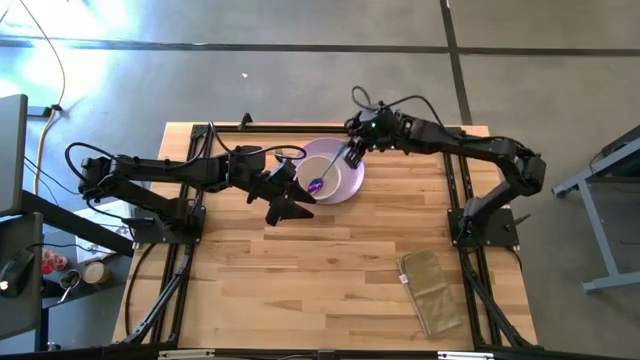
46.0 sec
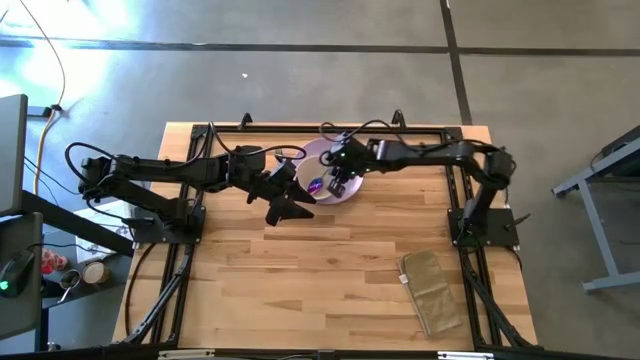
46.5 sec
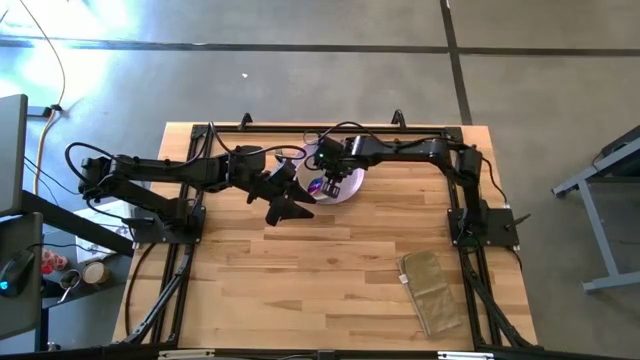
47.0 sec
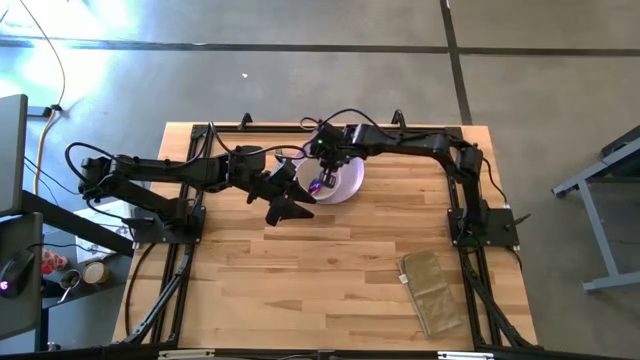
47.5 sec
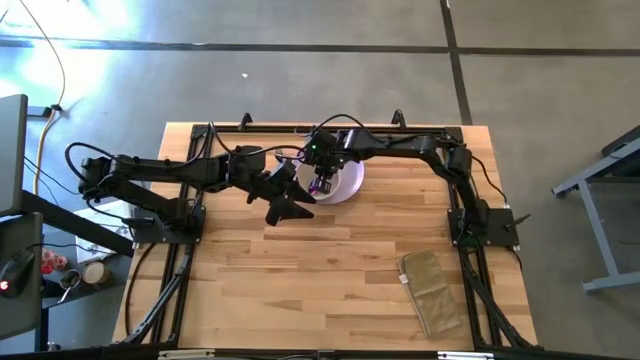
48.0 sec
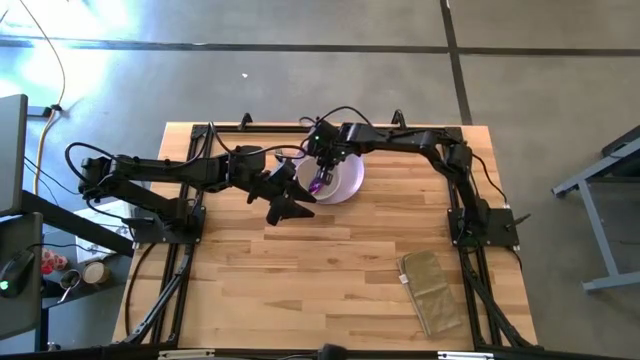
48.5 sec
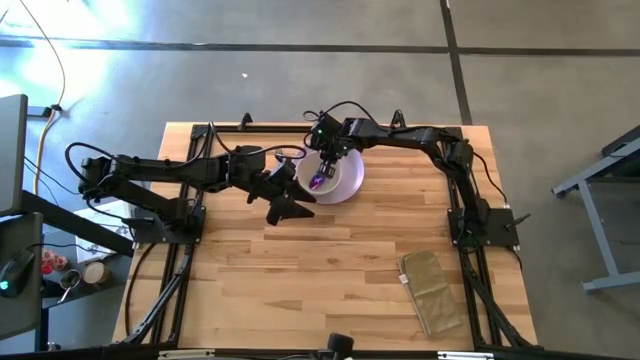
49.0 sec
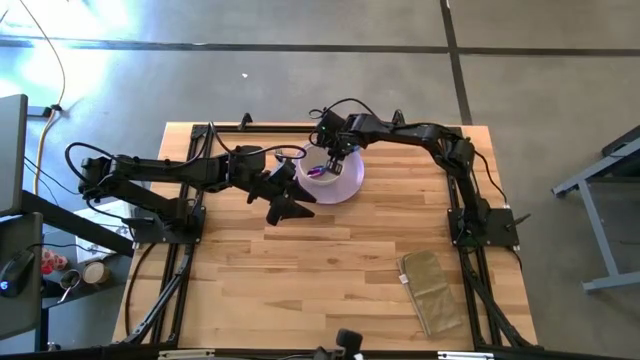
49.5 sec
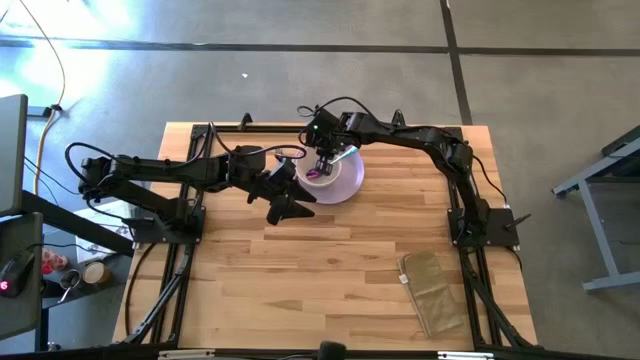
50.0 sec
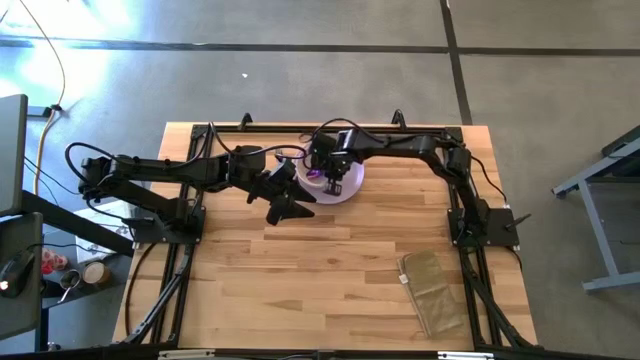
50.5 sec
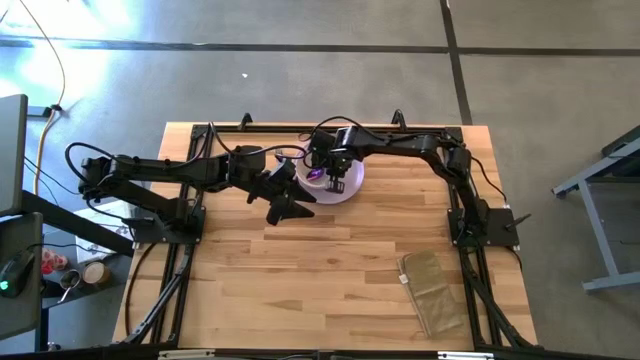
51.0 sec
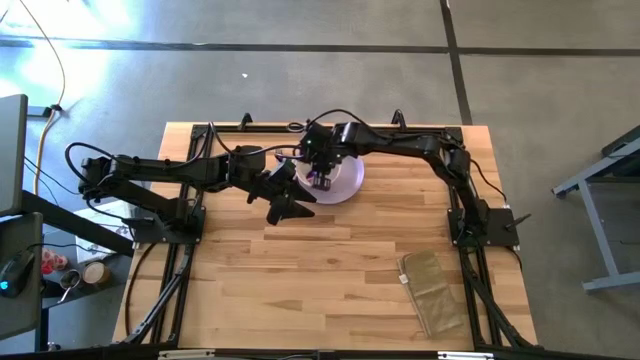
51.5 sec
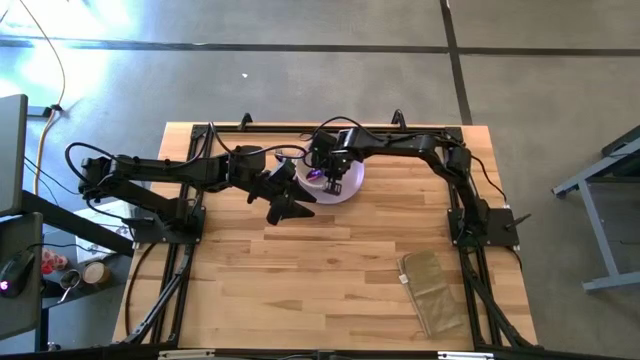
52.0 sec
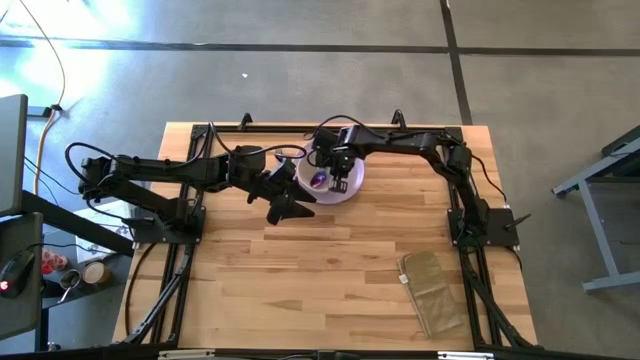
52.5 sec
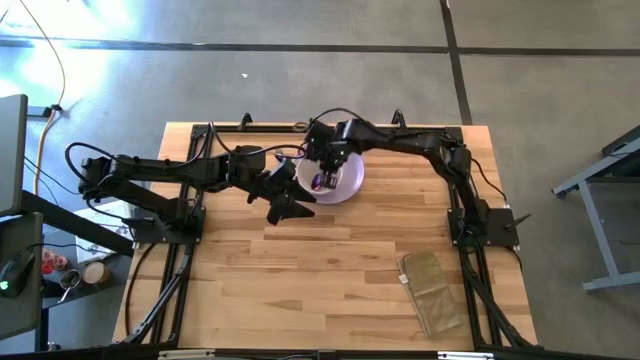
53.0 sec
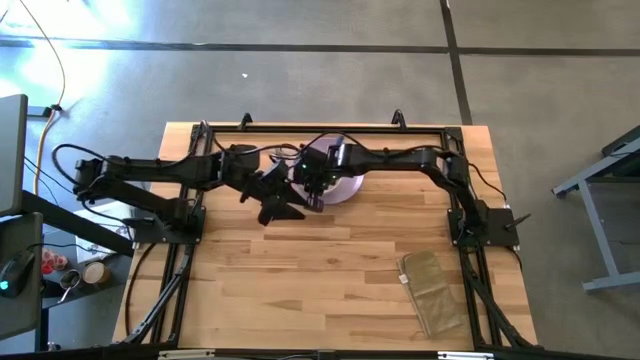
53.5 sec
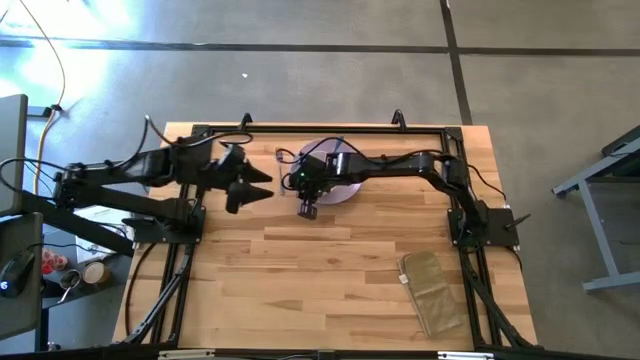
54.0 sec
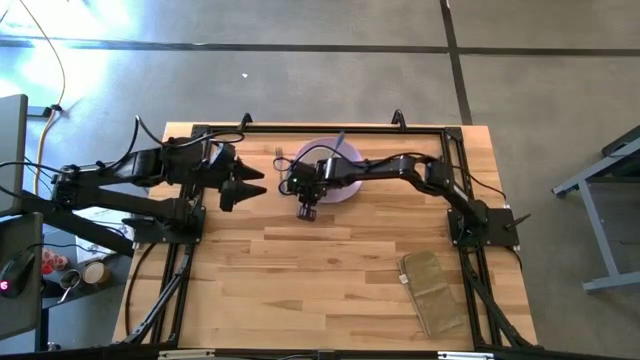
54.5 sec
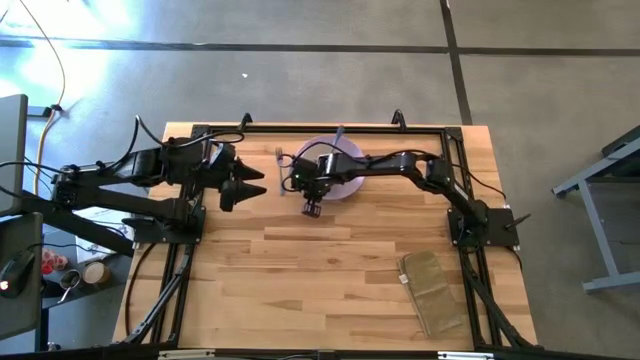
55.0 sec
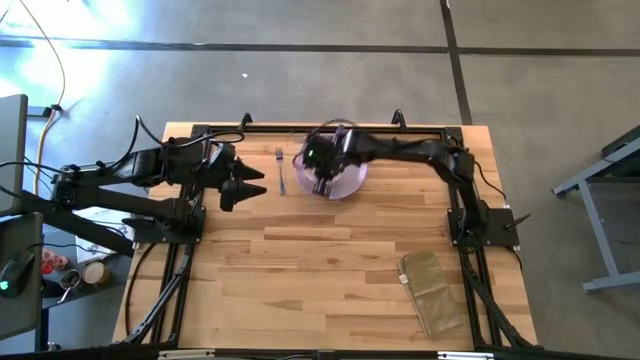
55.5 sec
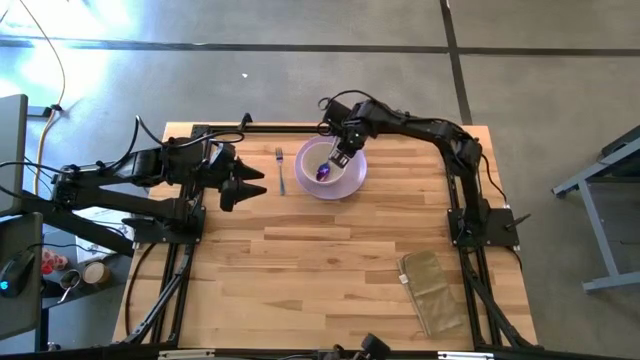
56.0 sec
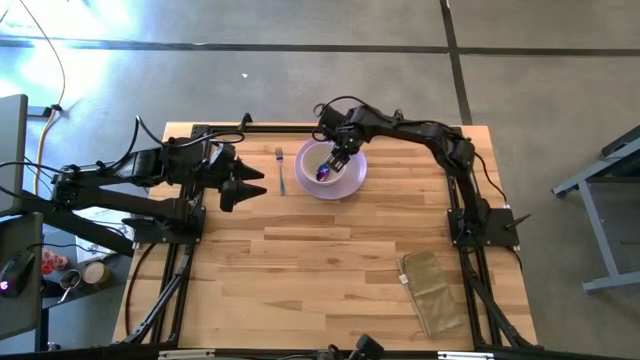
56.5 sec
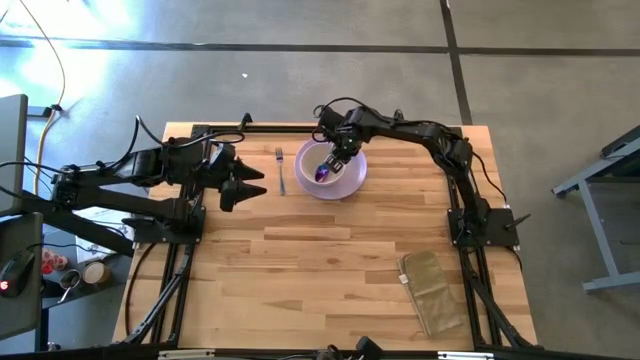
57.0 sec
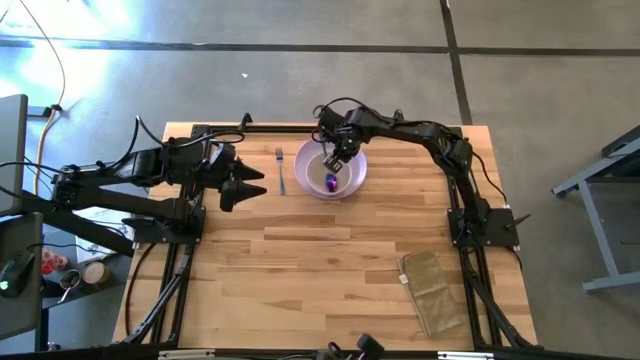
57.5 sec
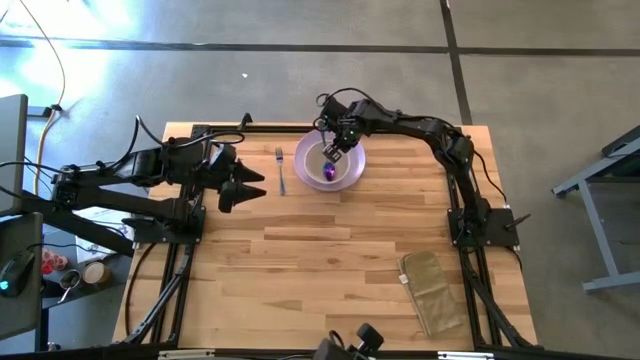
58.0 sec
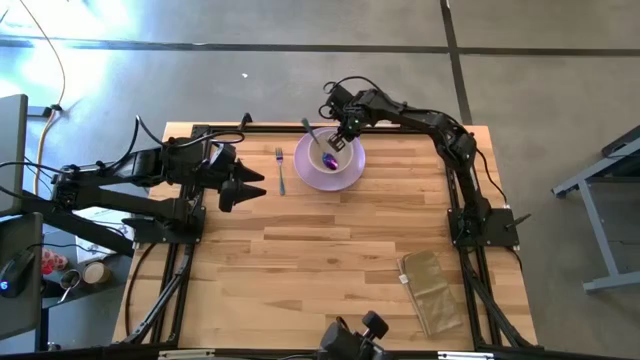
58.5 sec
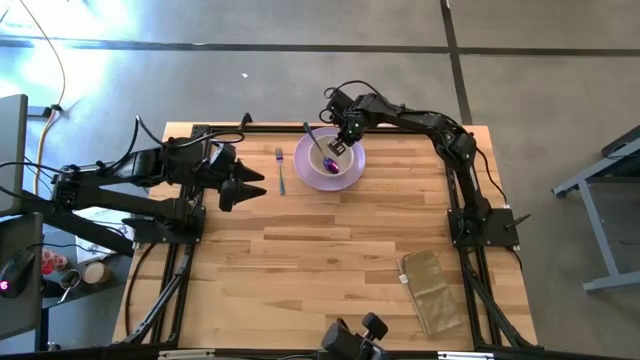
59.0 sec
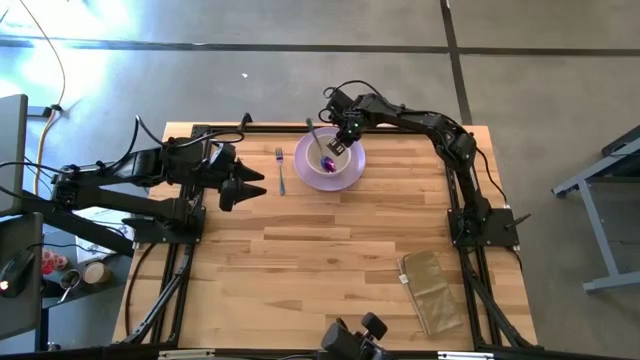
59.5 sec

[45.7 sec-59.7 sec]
Task: Set table place
Adjust the white bowl on the plate

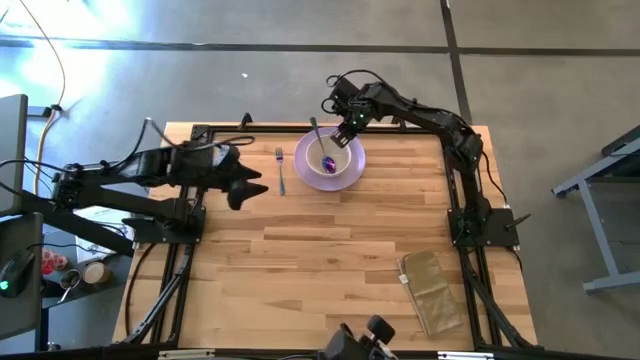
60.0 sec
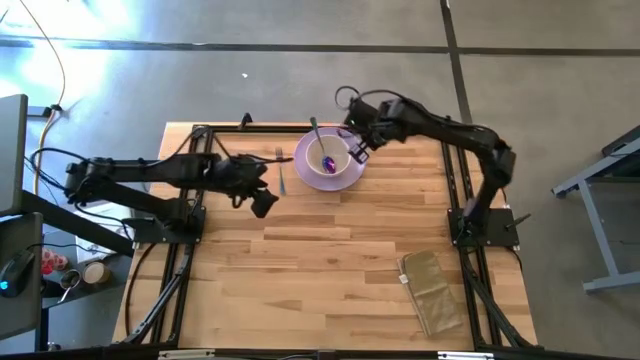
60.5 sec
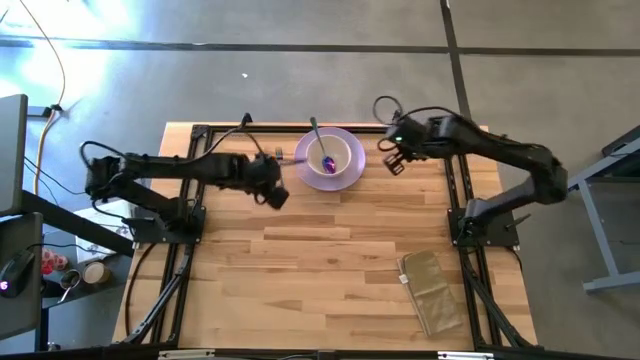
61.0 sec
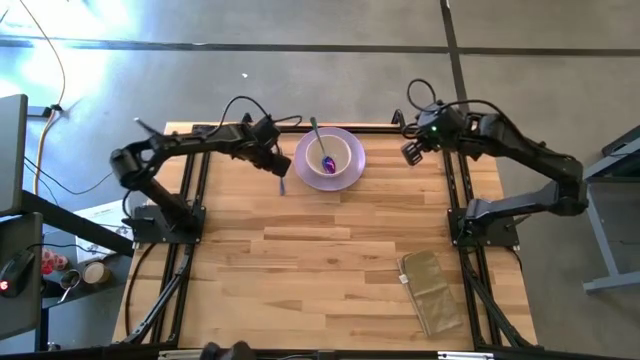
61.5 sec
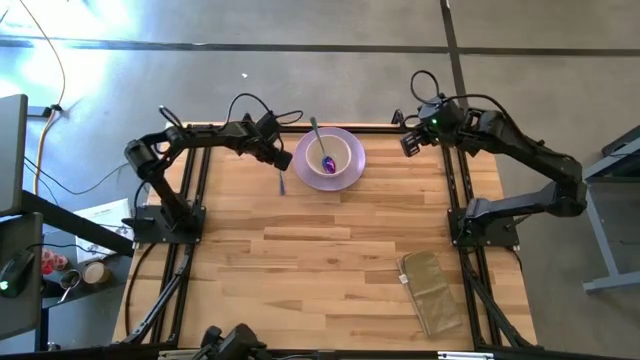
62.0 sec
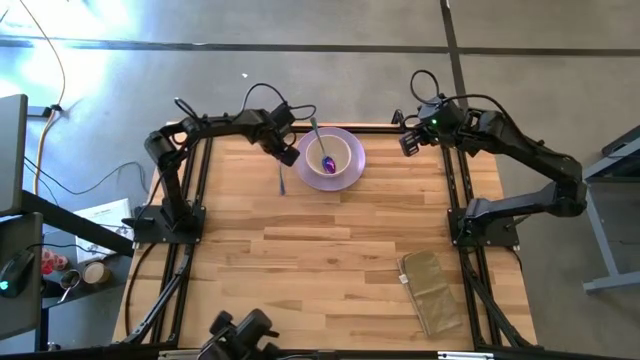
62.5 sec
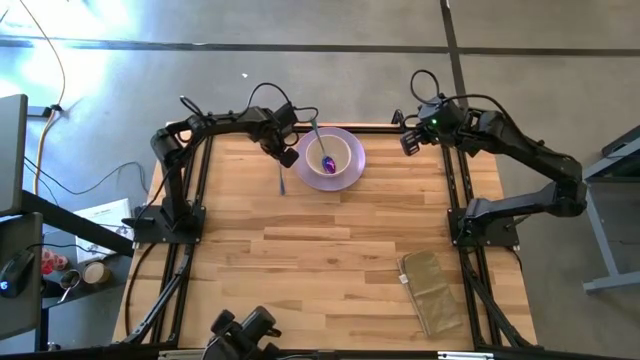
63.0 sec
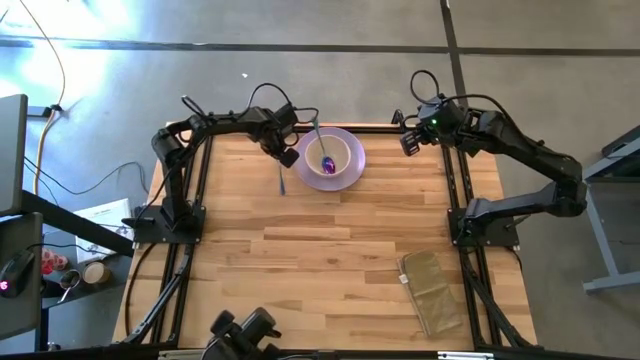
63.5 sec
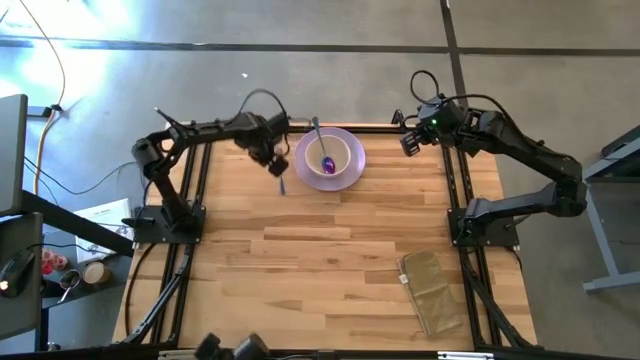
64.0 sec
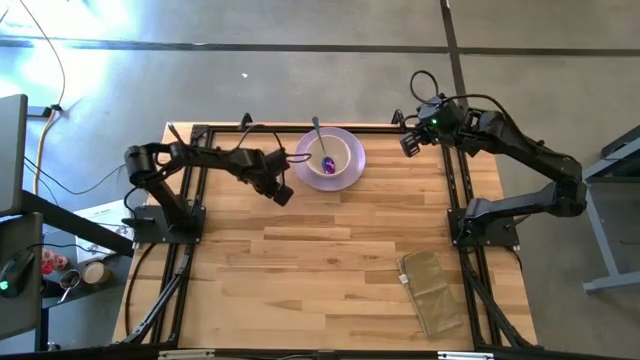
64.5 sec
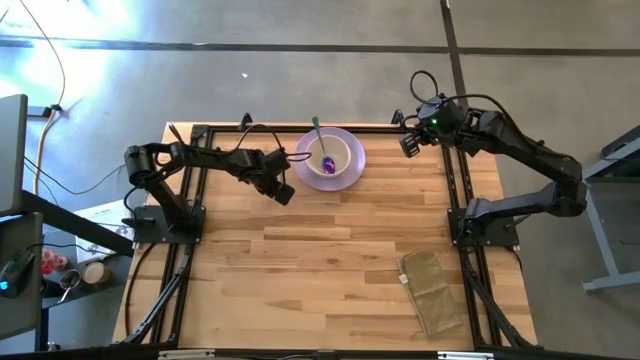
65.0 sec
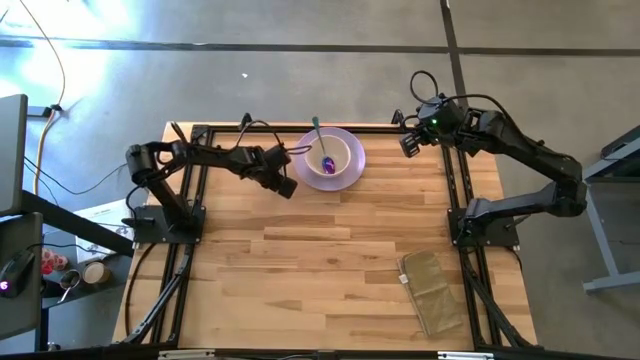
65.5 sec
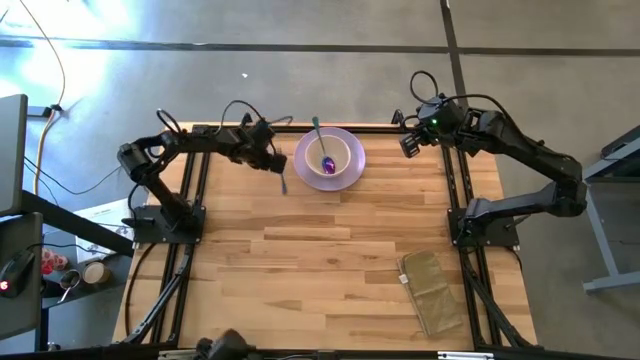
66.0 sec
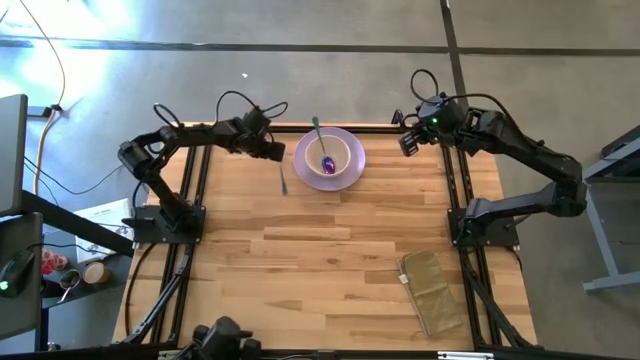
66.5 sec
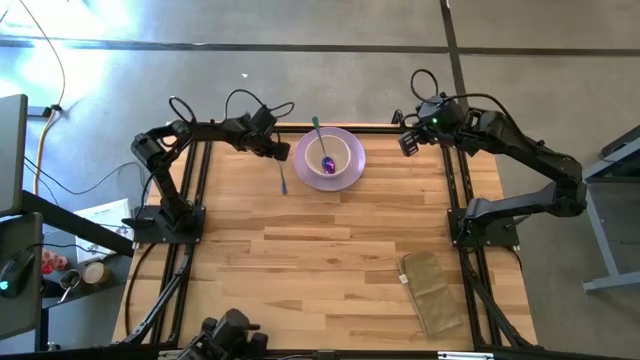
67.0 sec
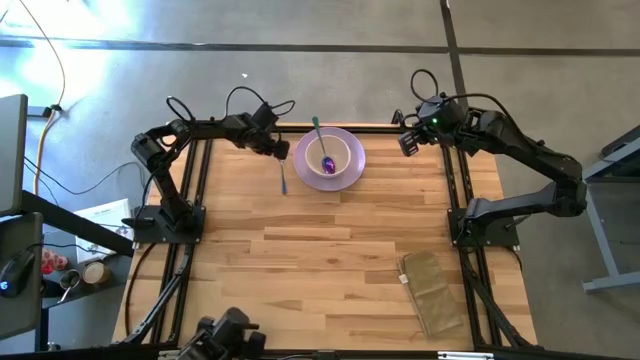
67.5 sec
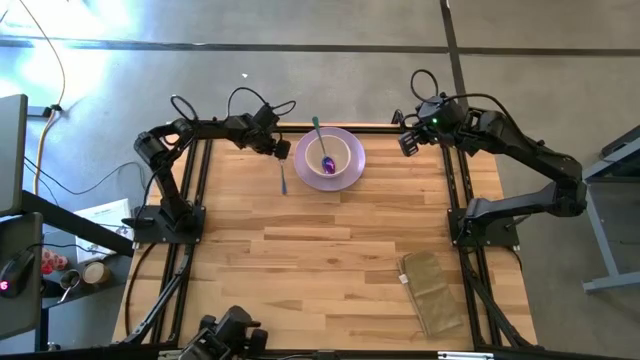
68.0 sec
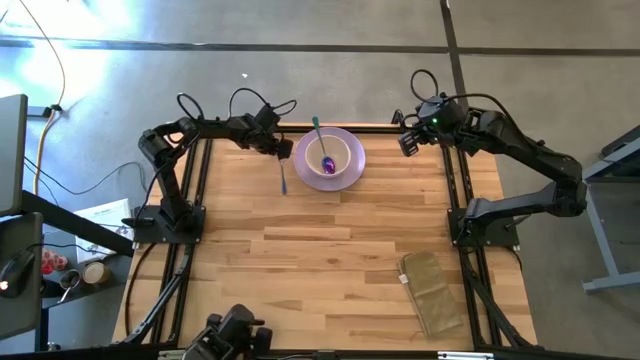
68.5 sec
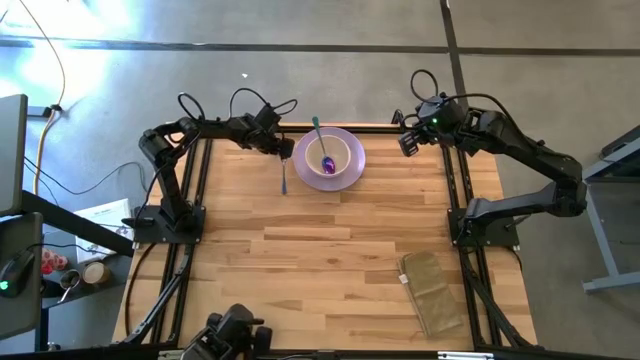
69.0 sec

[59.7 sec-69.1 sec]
Adjust the violet fork
